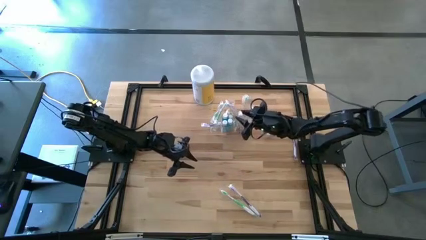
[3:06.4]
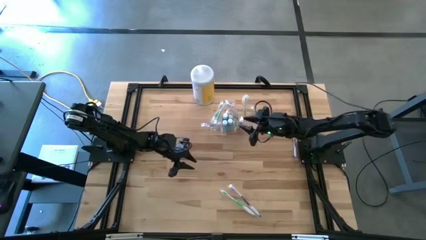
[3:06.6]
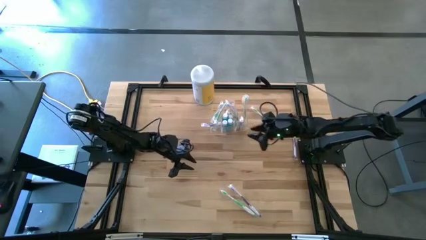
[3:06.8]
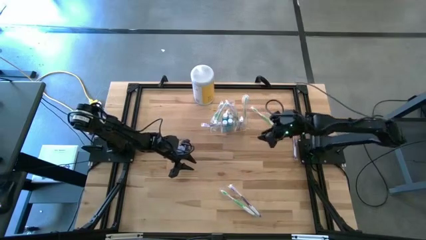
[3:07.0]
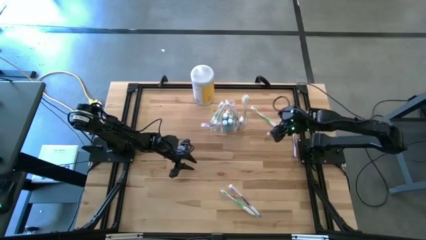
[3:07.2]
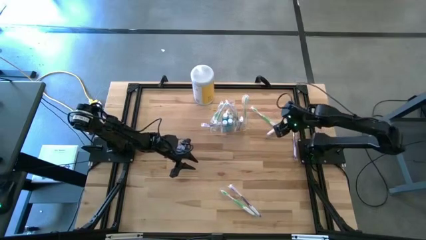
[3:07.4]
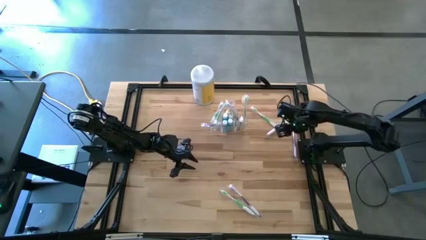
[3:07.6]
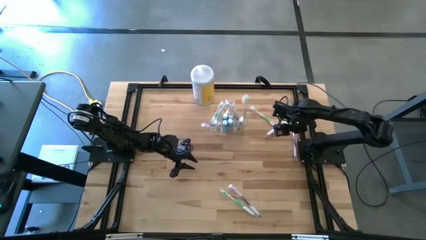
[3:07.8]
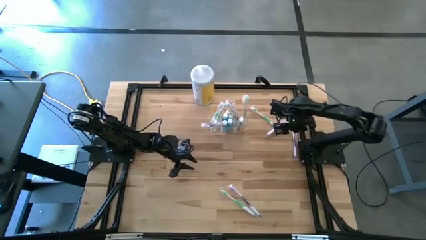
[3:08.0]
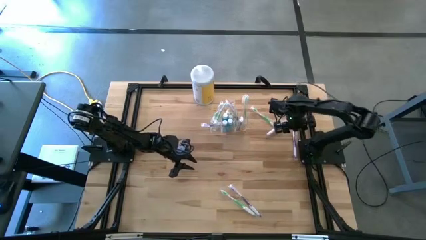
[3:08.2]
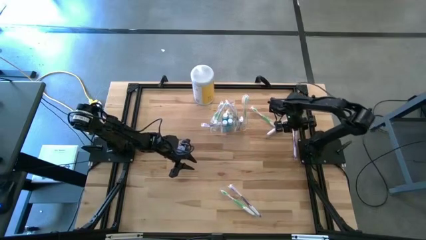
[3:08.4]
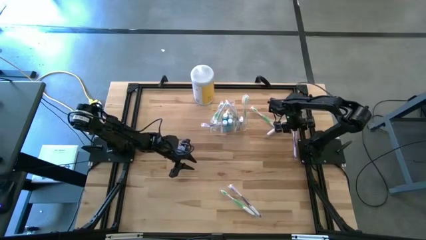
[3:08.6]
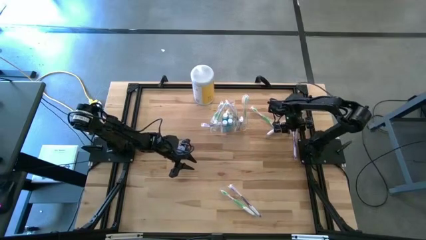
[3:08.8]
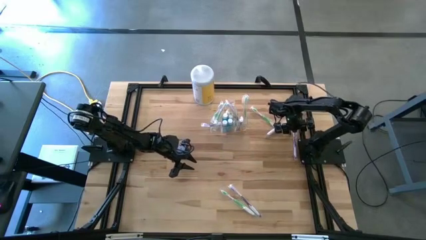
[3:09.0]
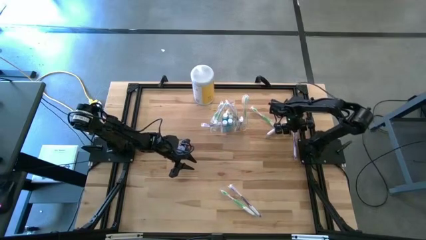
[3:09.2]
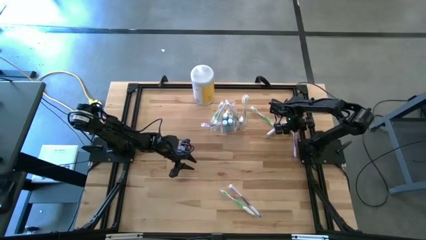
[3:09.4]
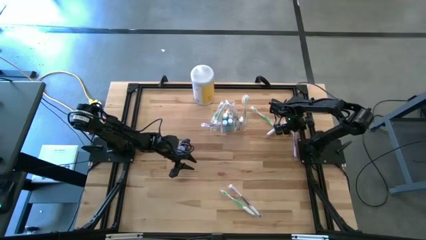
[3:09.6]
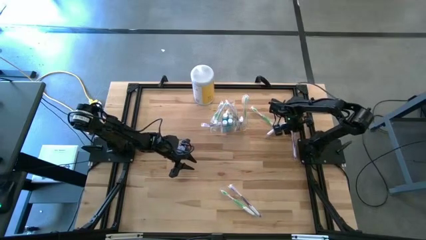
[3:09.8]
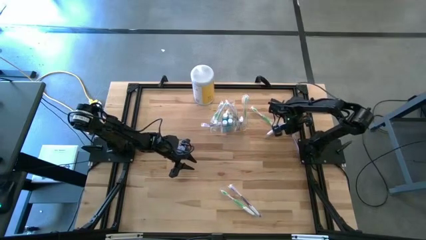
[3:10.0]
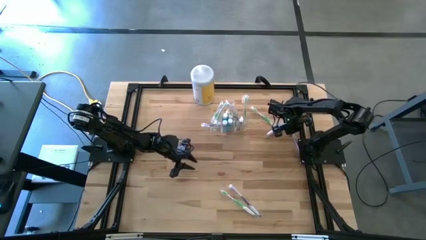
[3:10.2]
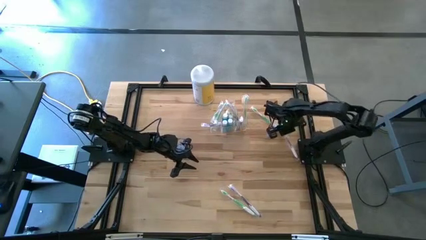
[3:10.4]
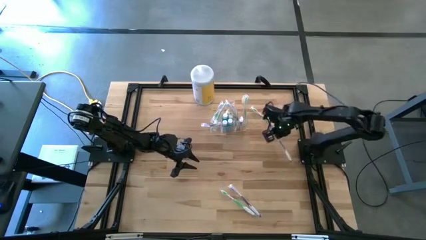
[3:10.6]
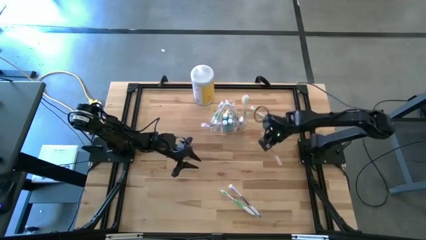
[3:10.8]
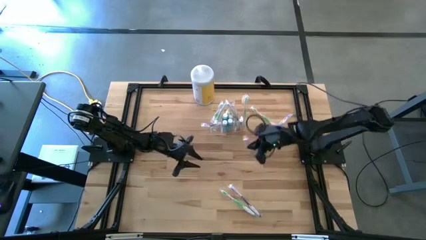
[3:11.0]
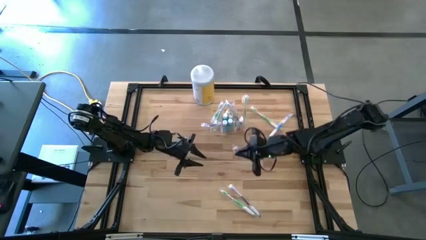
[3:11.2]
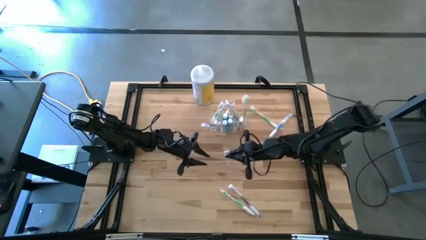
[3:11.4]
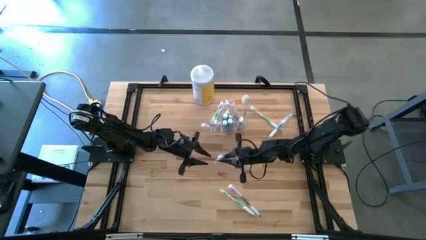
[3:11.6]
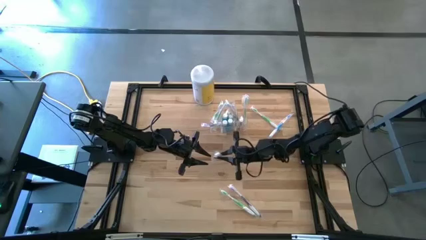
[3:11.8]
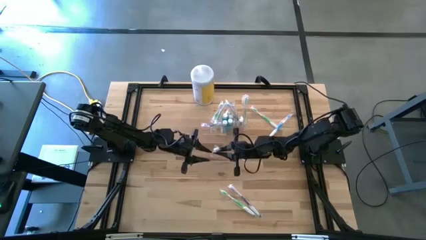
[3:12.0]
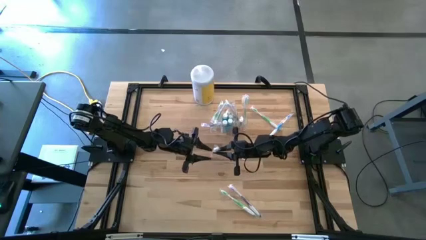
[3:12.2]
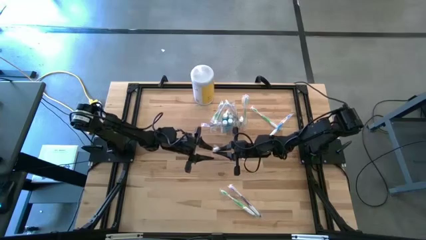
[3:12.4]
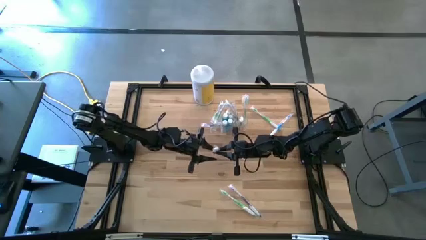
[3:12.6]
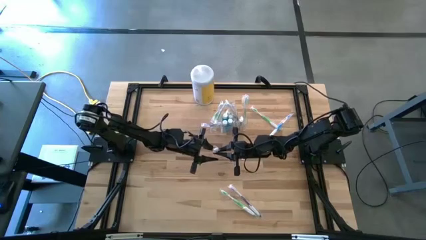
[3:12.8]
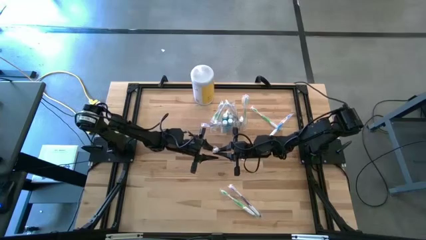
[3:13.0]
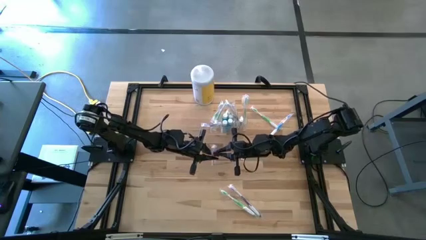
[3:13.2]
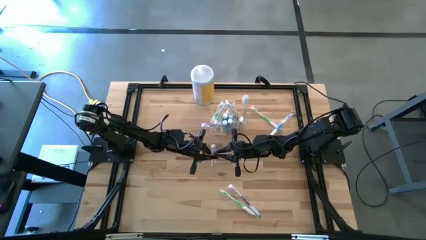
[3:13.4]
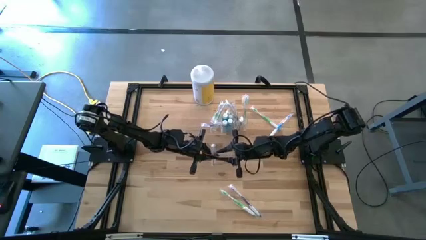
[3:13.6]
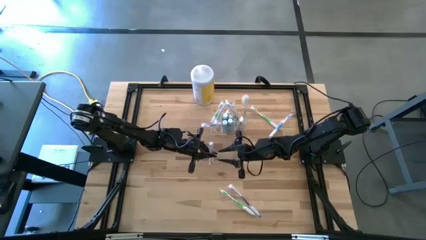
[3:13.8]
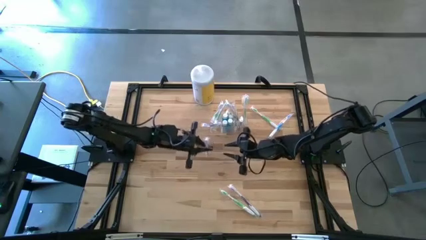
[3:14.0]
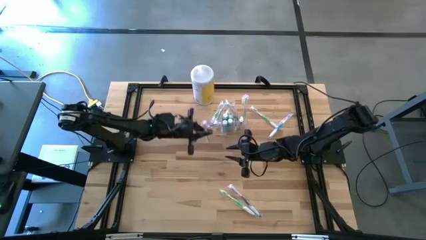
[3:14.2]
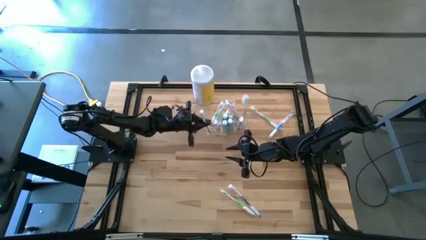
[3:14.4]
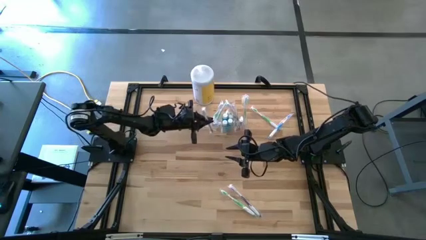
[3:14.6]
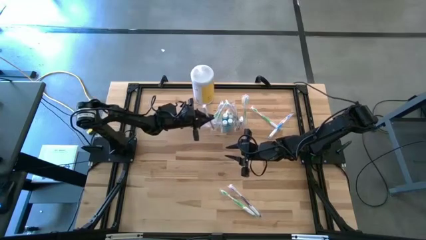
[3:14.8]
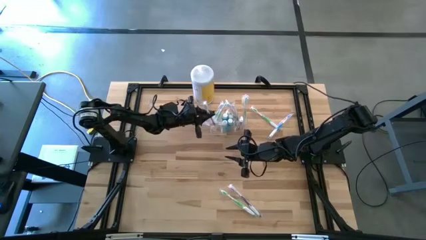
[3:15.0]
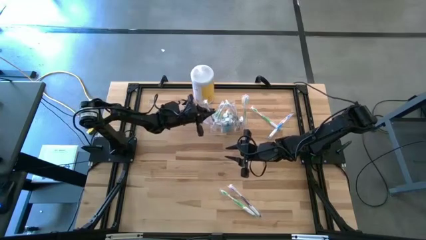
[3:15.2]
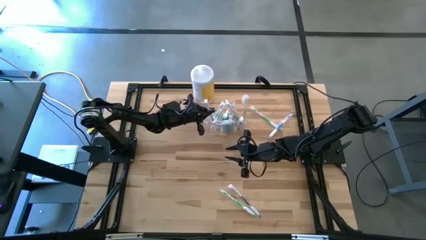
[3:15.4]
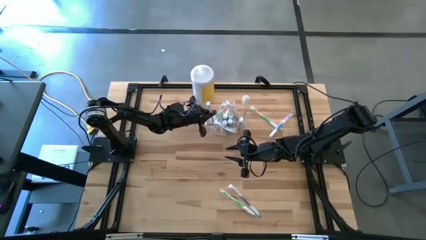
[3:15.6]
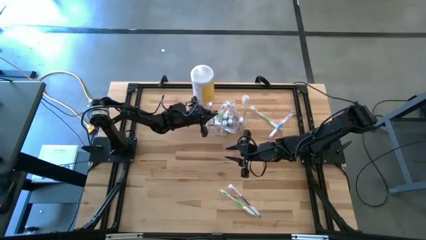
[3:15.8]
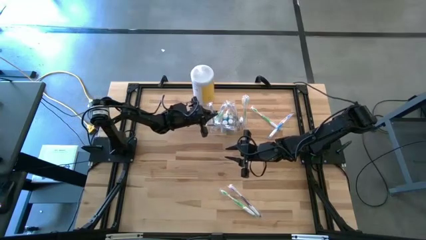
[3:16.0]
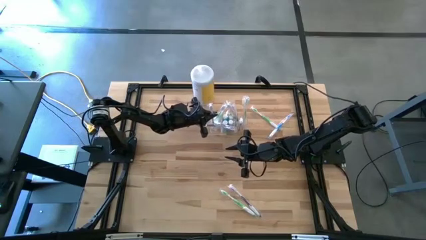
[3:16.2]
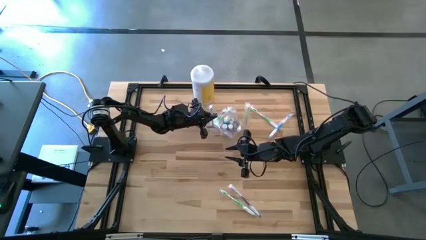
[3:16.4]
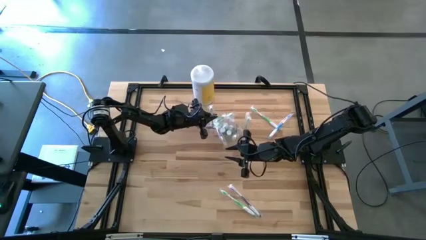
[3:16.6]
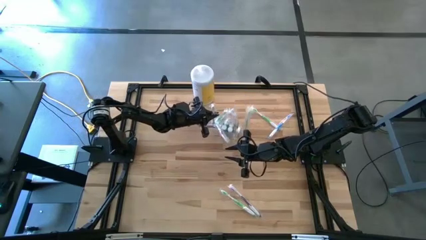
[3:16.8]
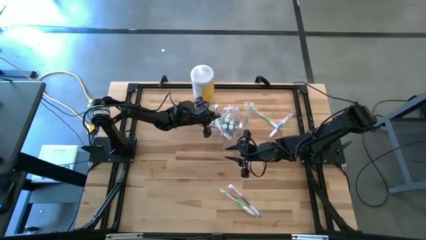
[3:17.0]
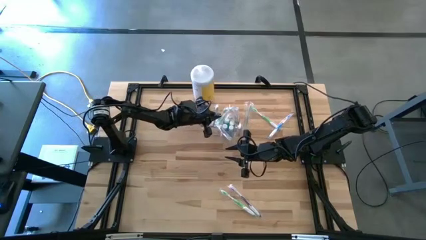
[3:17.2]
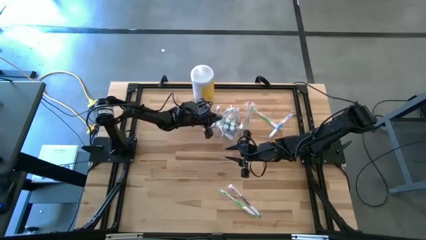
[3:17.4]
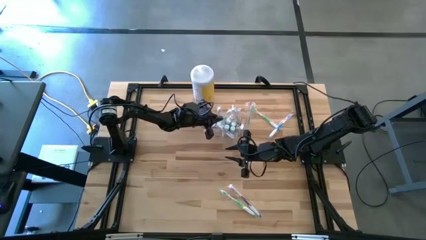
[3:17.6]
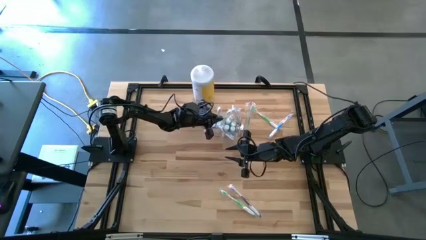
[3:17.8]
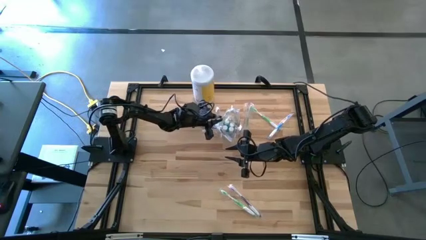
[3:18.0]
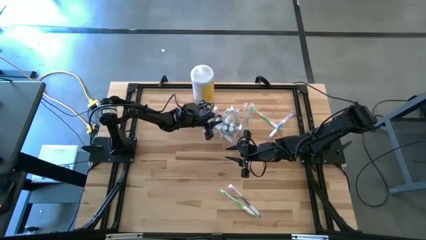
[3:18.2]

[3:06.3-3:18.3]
Task: Pick & Place toothbrushing station
Put the top purple toothbrush into the transparent organizer

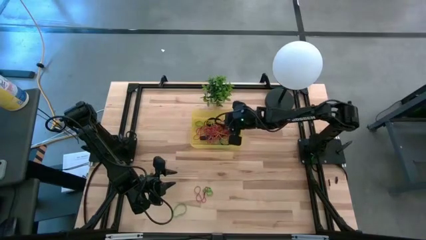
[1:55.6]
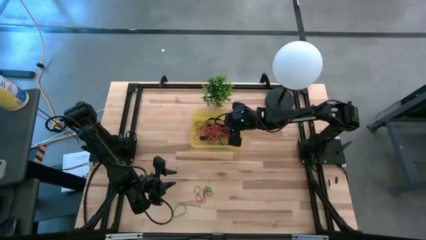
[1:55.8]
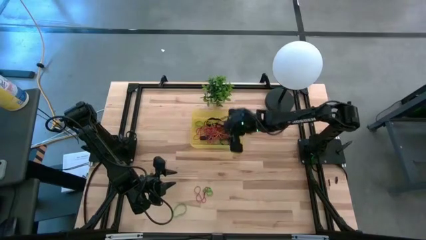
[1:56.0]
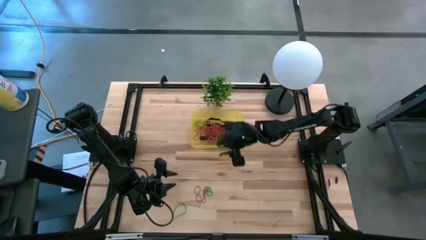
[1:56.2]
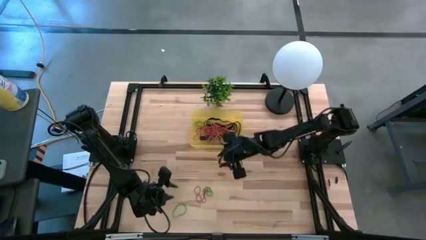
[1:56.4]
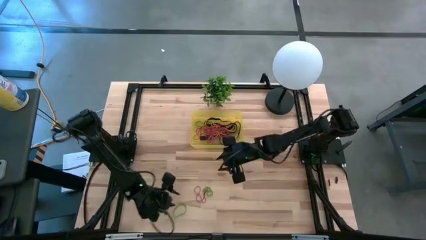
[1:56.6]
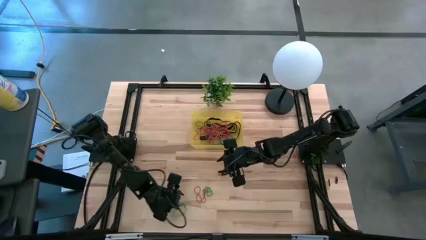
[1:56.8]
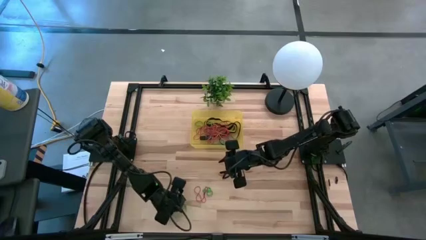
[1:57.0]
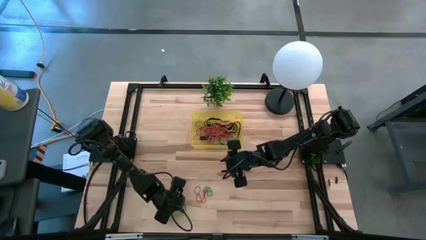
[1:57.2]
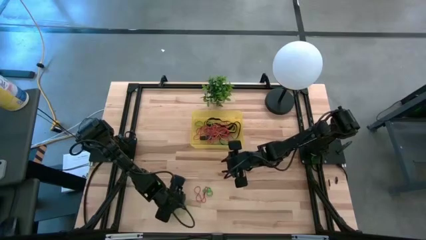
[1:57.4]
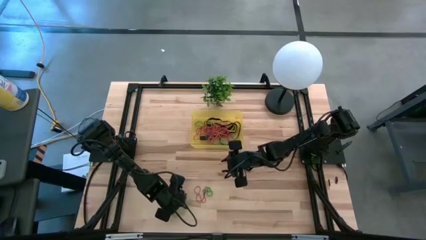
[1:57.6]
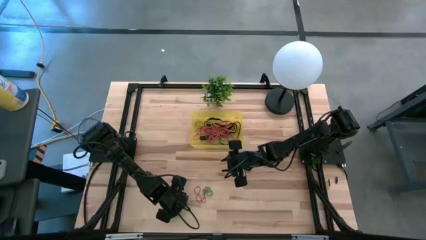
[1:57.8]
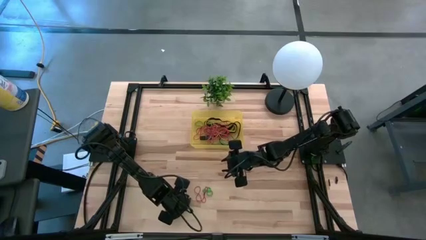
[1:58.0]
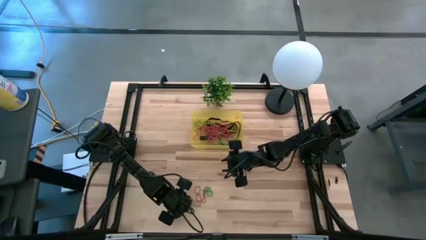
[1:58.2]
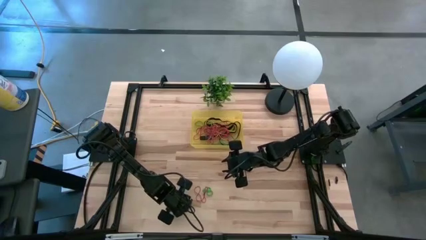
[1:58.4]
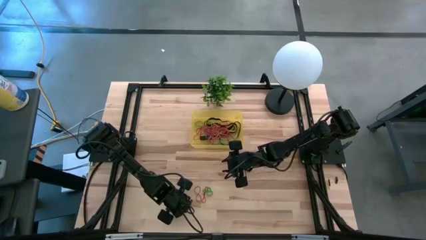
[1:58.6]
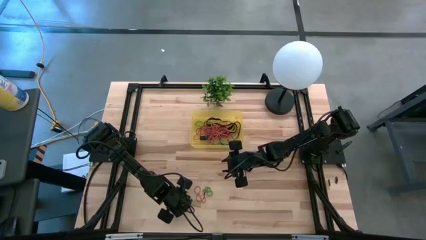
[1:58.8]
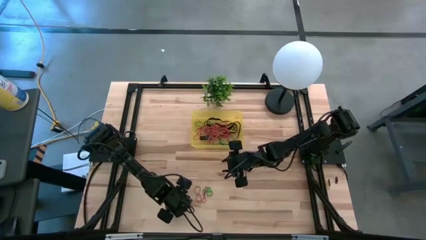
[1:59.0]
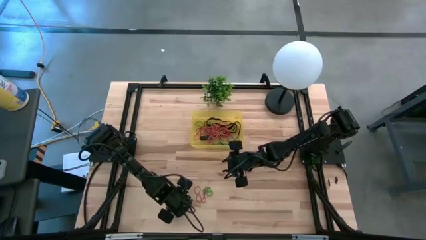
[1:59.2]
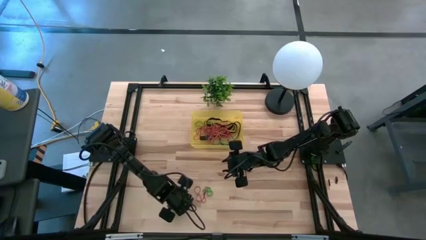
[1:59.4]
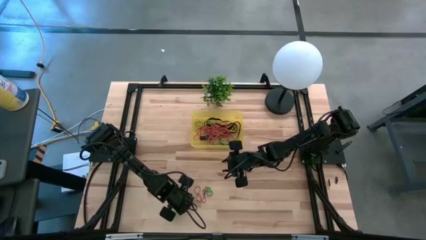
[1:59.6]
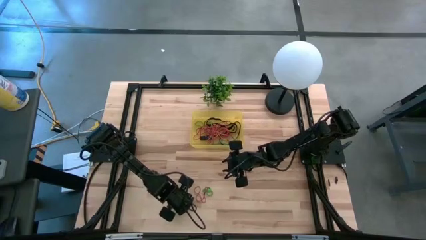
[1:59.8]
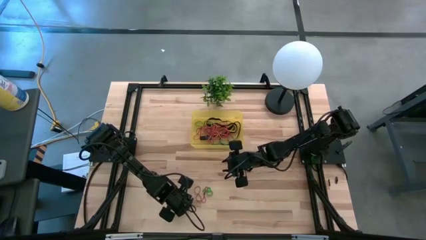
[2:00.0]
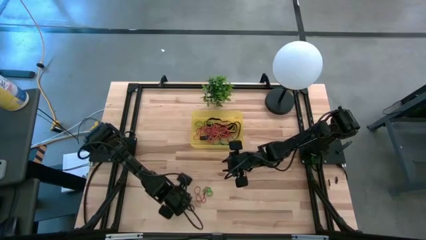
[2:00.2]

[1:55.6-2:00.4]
Task: Pick and place rubber bands into bin
Put the green rubber band into the yellow bin
